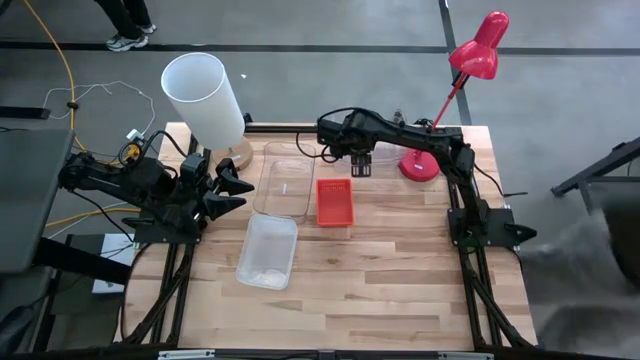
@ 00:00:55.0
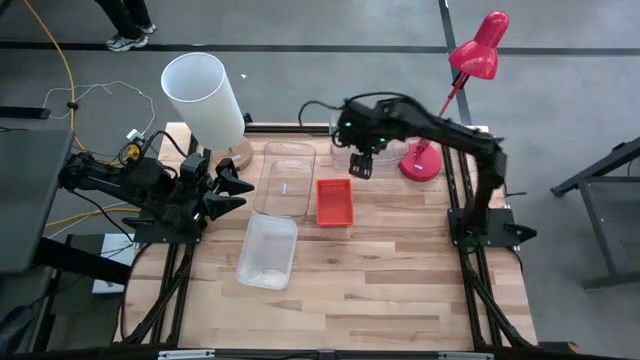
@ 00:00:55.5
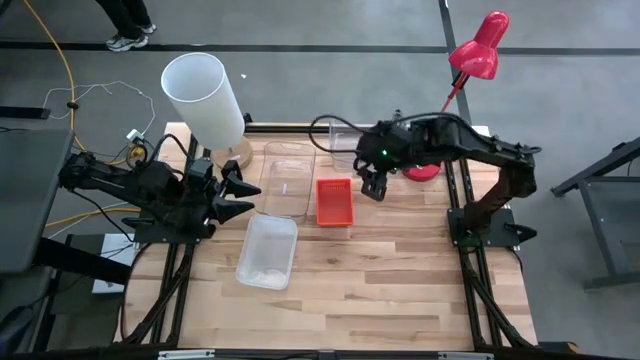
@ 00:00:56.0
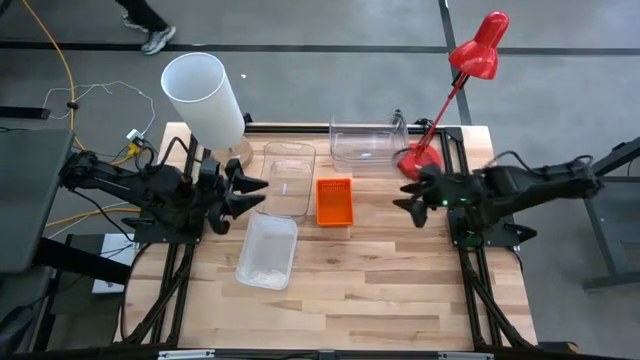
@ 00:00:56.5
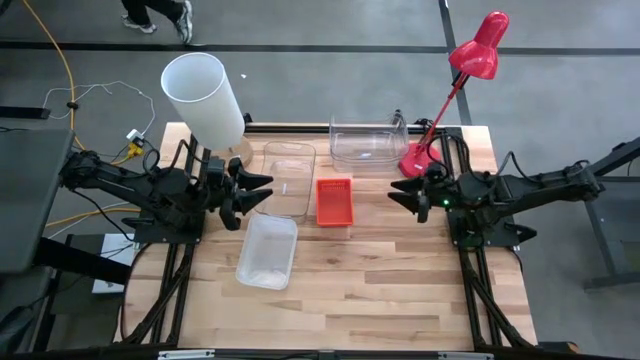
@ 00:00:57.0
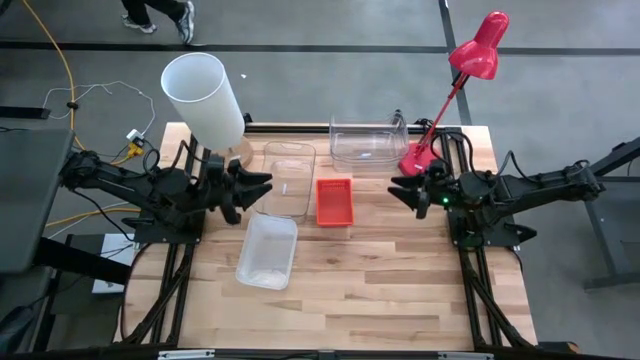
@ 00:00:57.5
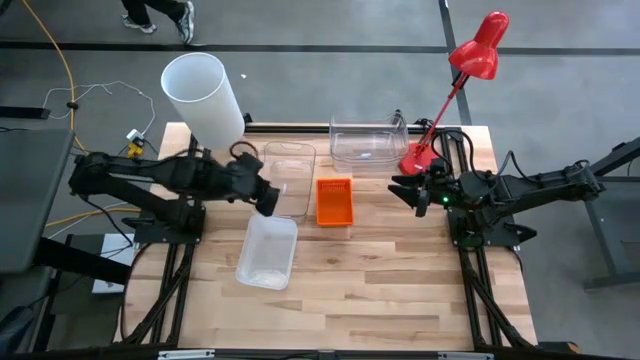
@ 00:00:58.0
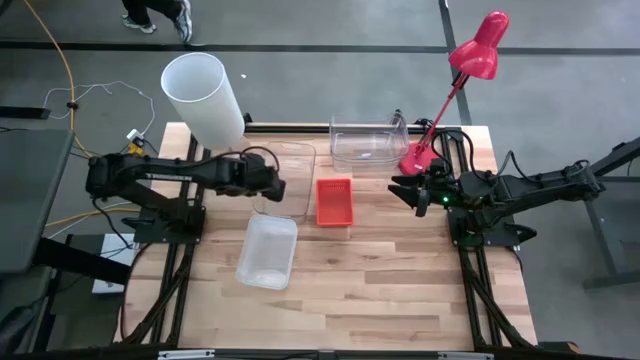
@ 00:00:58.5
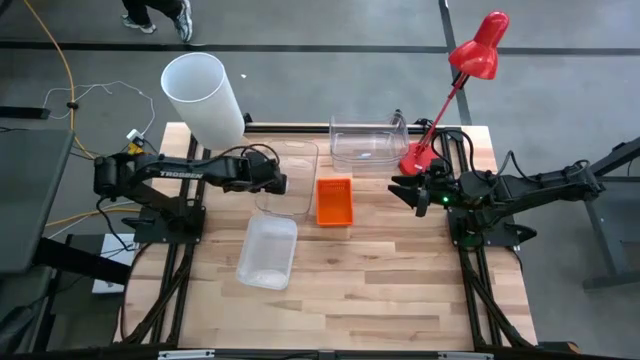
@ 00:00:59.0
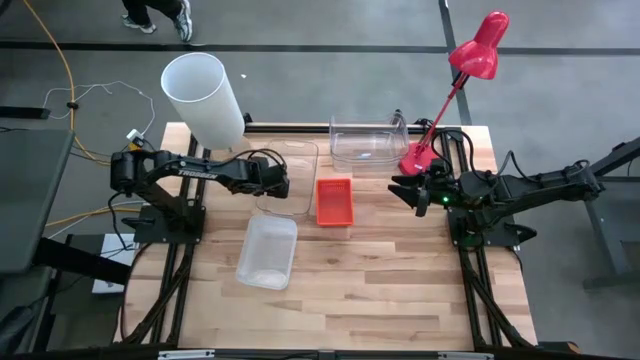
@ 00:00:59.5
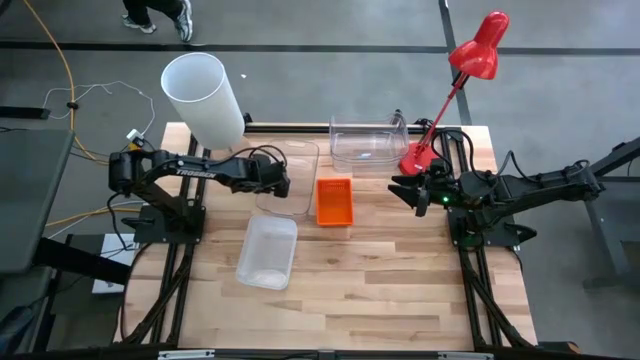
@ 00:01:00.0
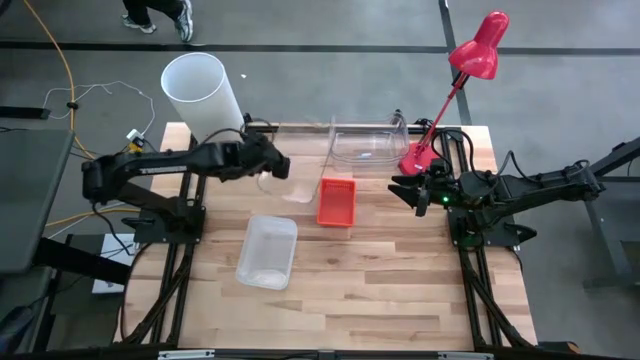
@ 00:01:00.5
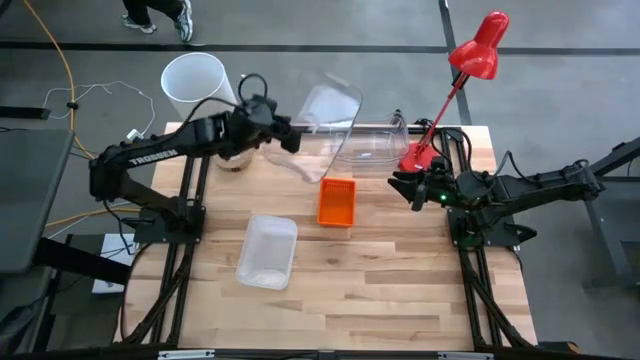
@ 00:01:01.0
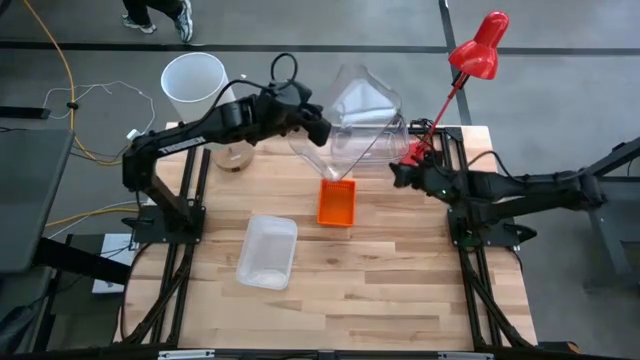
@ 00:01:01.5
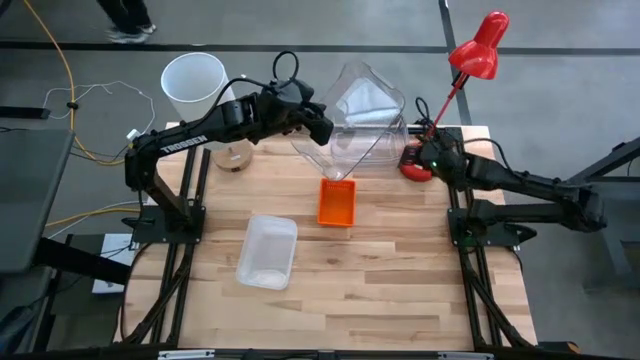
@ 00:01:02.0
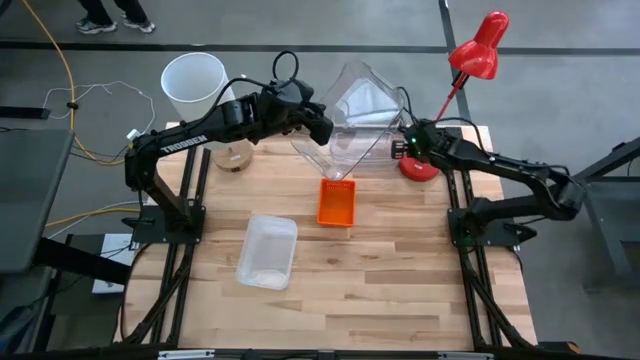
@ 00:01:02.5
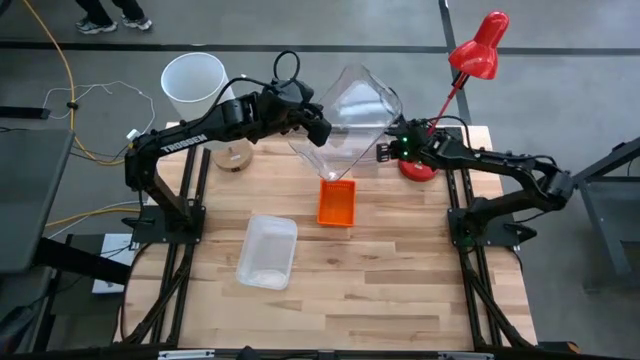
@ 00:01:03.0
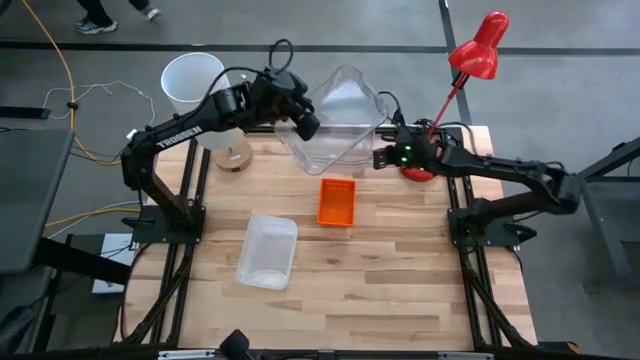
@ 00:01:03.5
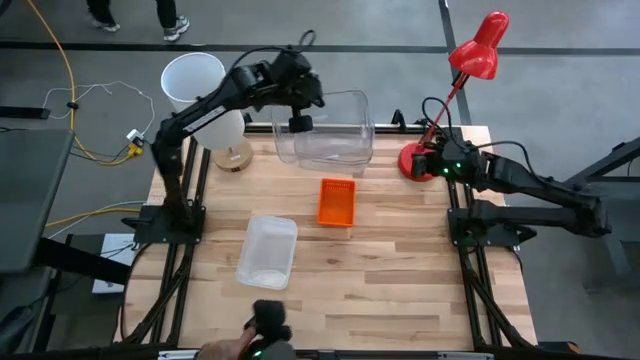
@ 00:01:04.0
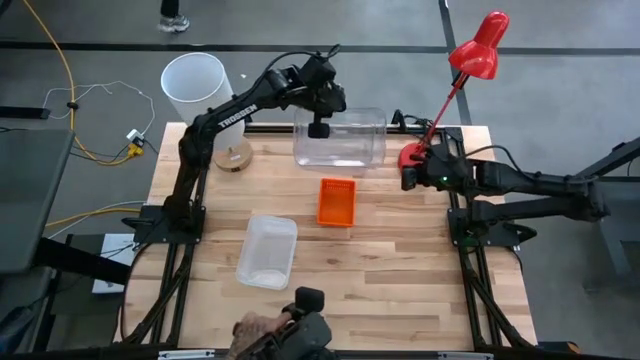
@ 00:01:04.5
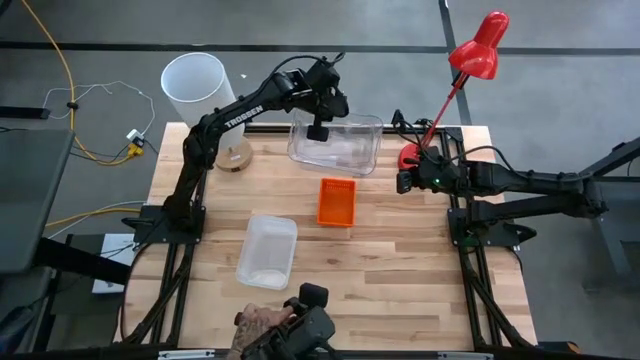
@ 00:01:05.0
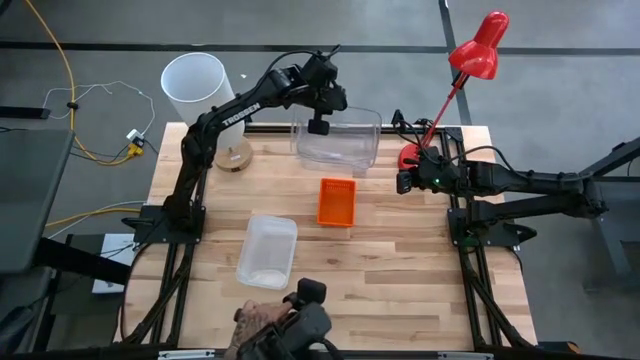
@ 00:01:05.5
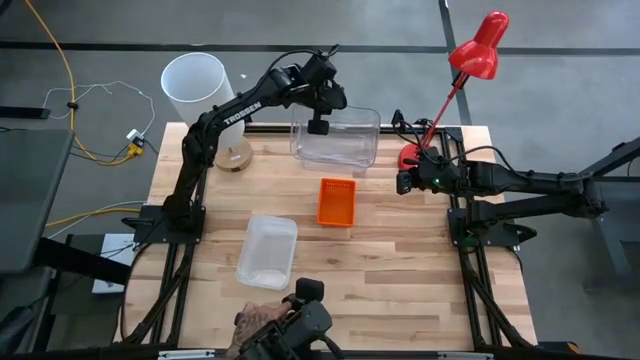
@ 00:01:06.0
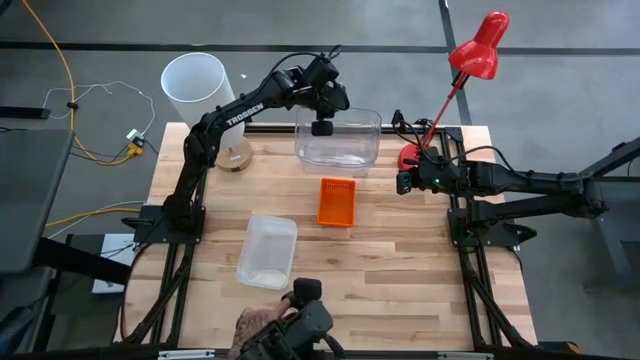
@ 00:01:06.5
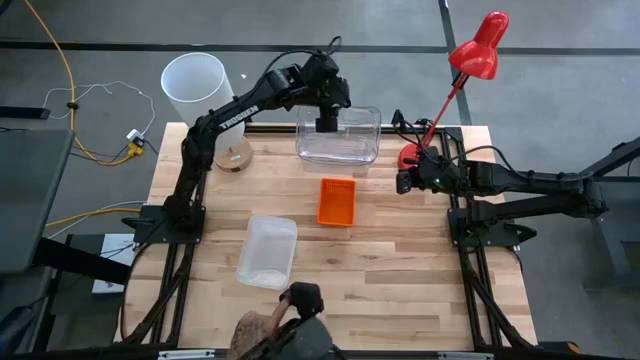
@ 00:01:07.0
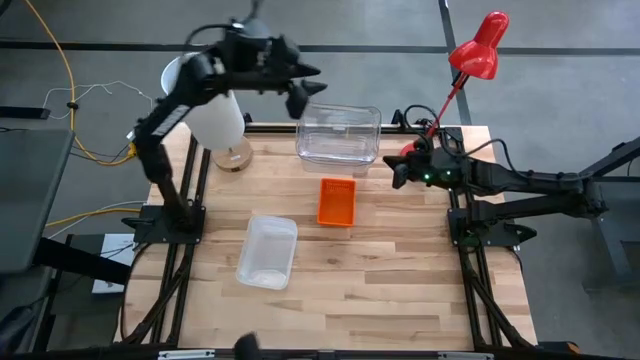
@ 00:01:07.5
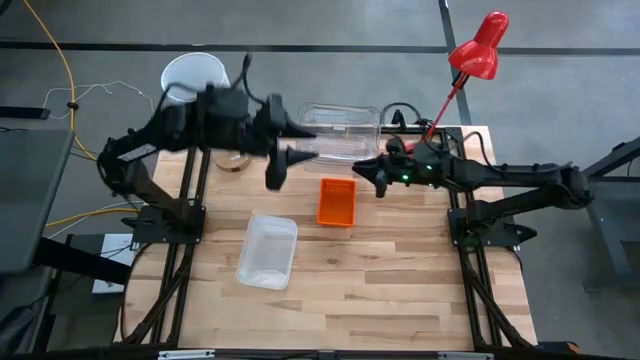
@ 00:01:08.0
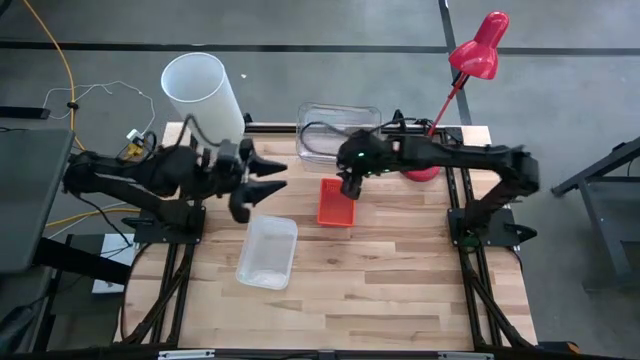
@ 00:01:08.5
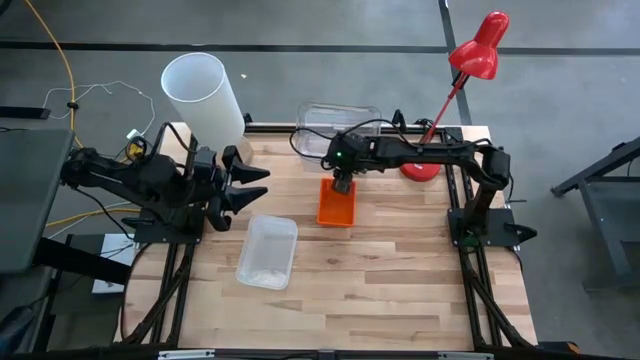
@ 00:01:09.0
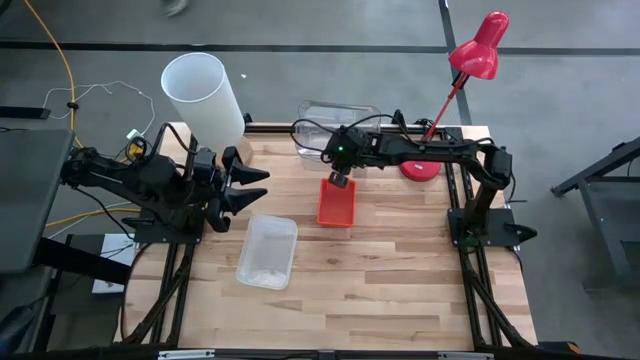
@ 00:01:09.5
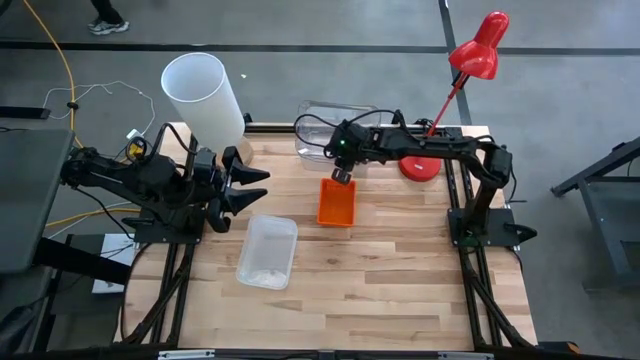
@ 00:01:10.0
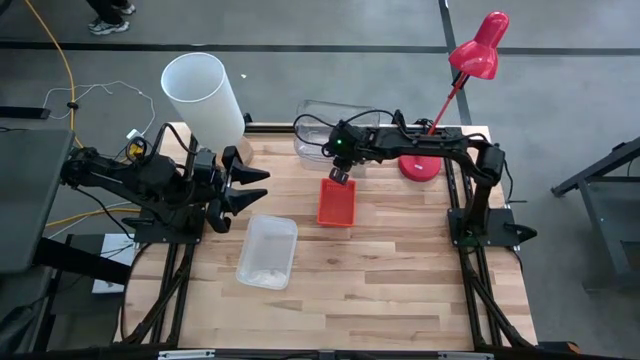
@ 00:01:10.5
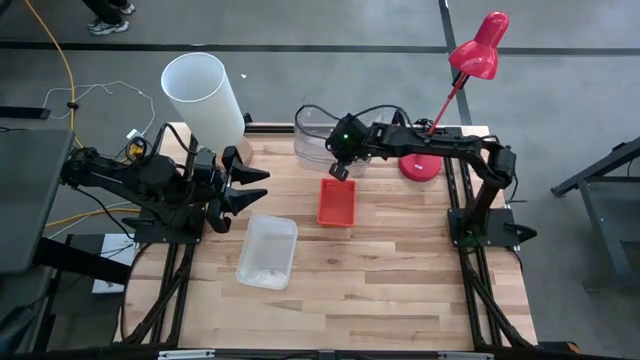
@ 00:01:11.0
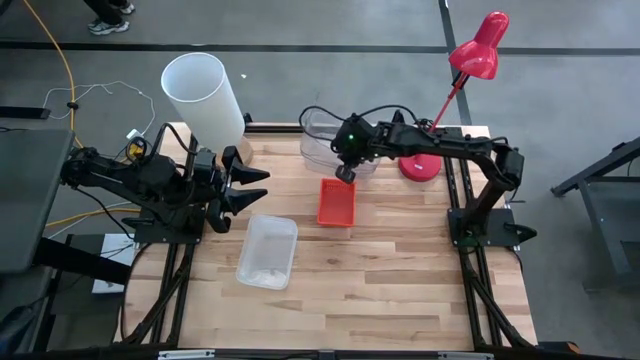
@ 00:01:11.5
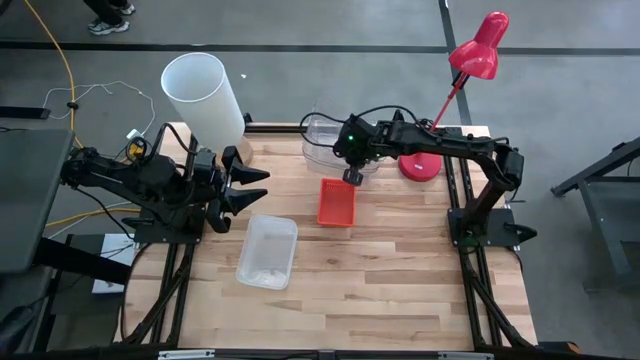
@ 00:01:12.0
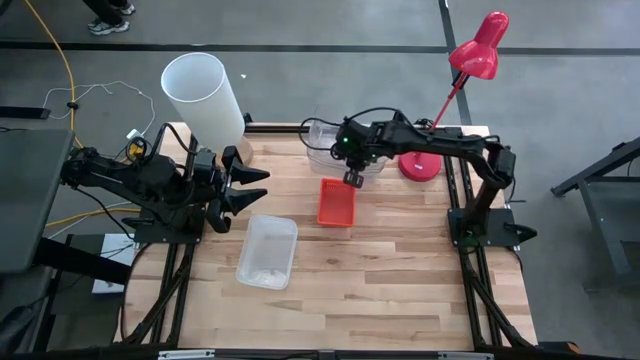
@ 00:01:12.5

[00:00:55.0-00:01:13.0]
Stack the bottom transparent bin on top of the top transparent bin
